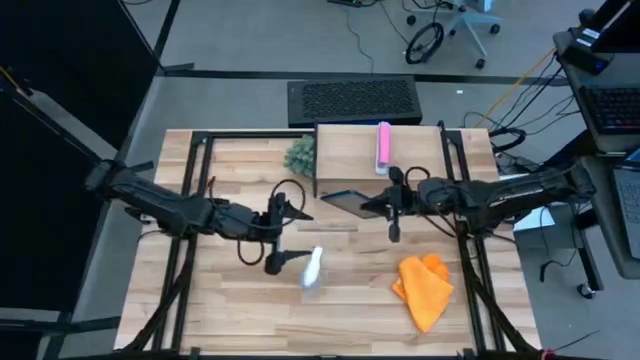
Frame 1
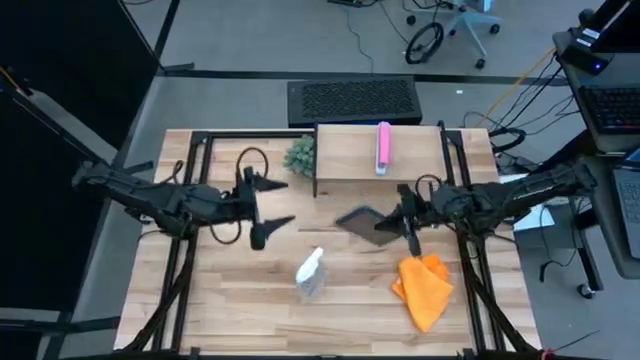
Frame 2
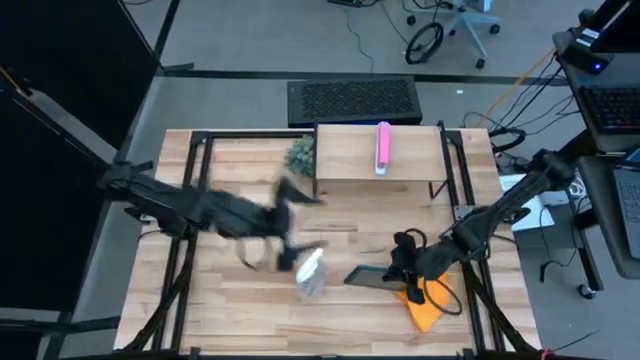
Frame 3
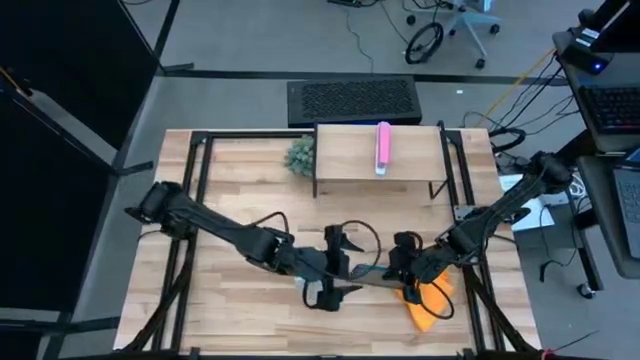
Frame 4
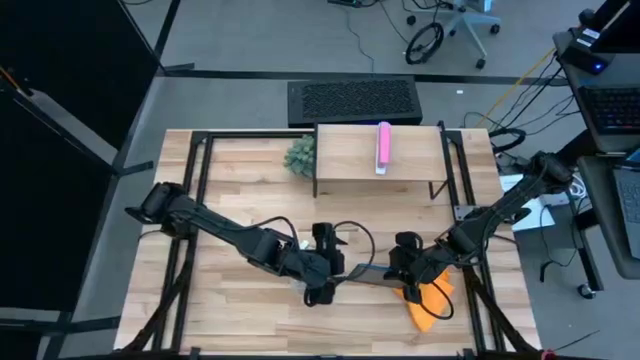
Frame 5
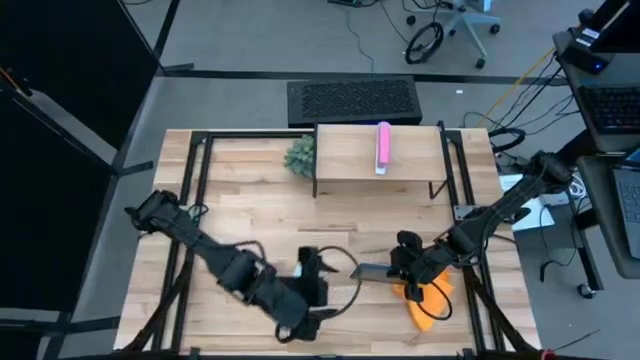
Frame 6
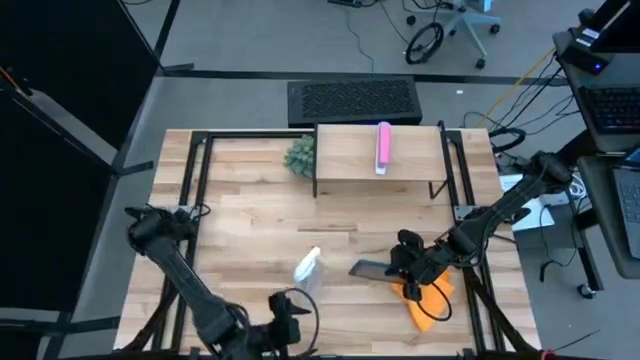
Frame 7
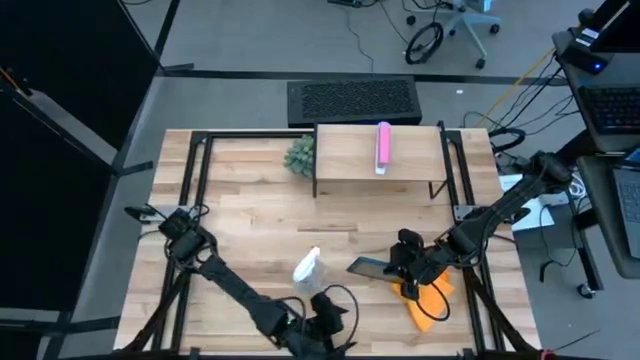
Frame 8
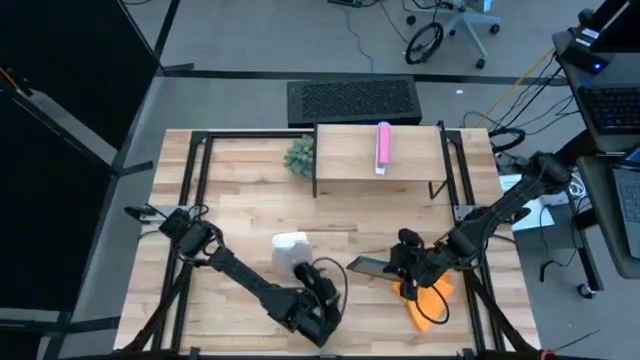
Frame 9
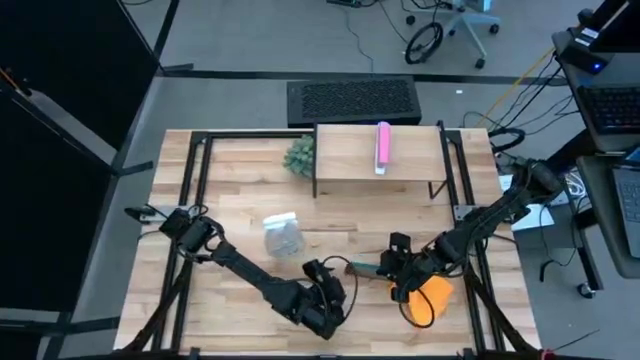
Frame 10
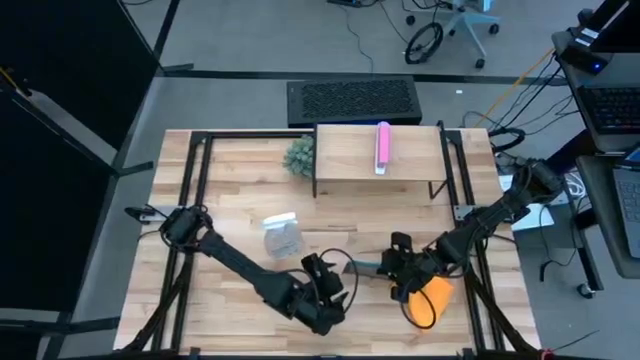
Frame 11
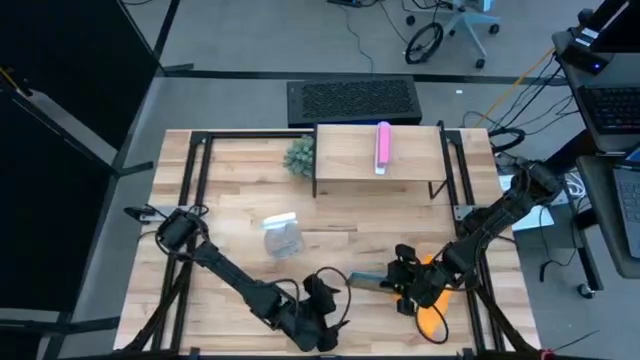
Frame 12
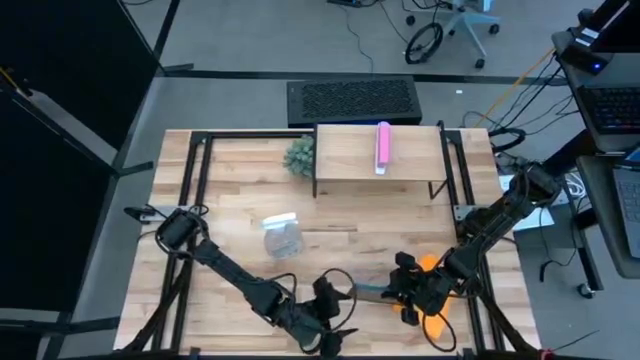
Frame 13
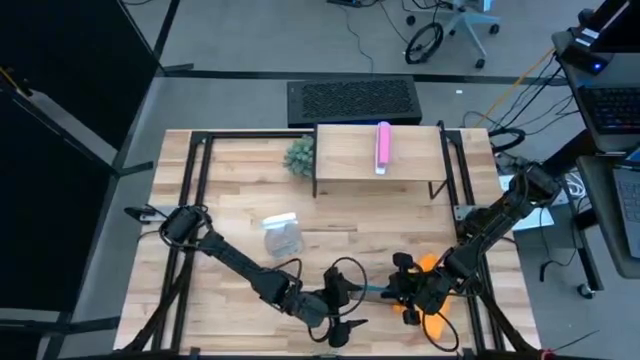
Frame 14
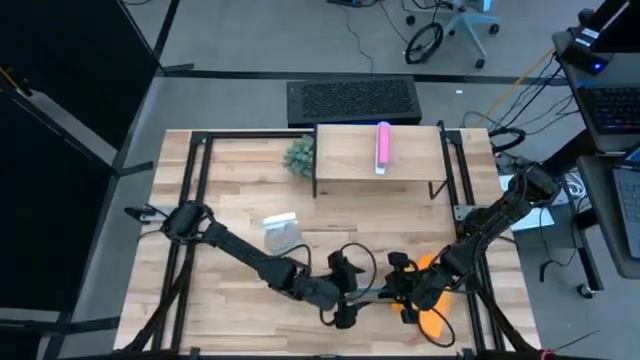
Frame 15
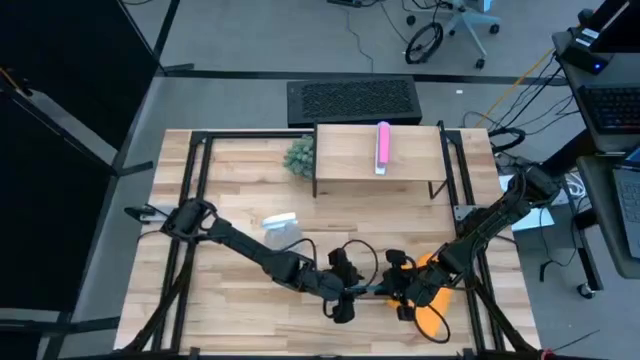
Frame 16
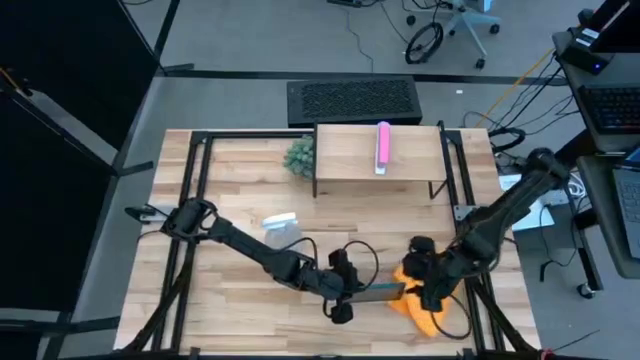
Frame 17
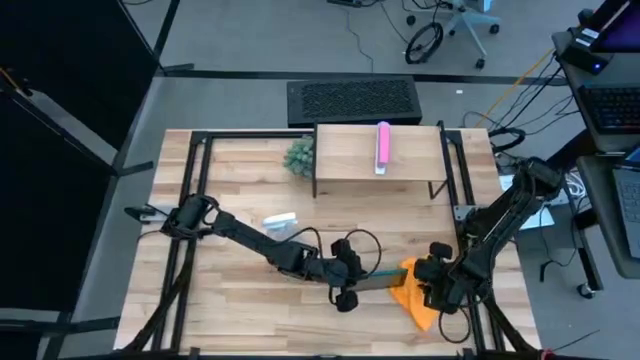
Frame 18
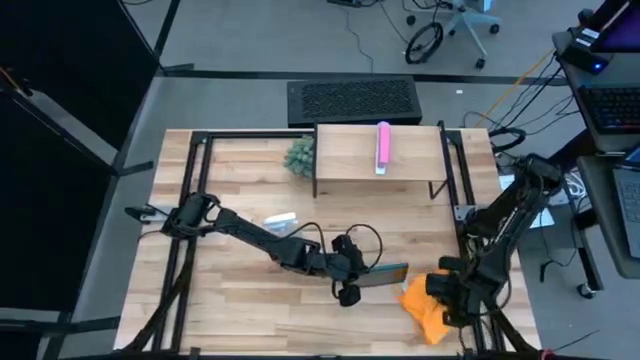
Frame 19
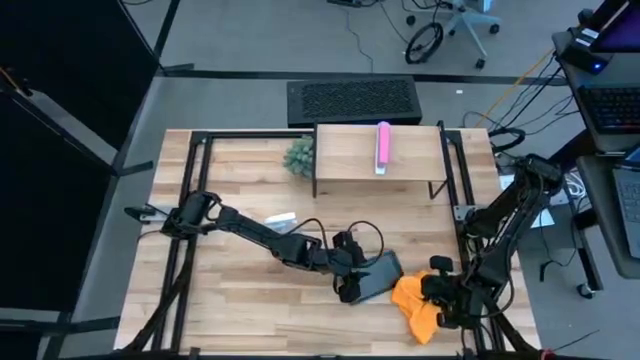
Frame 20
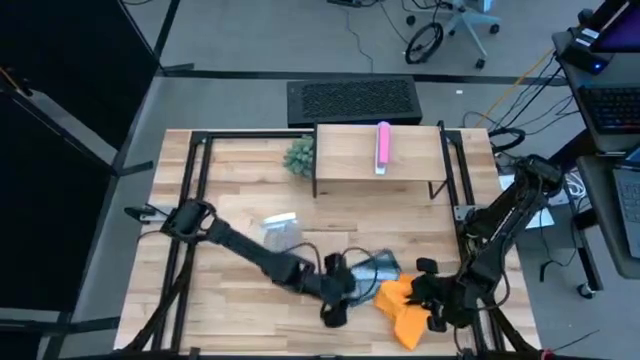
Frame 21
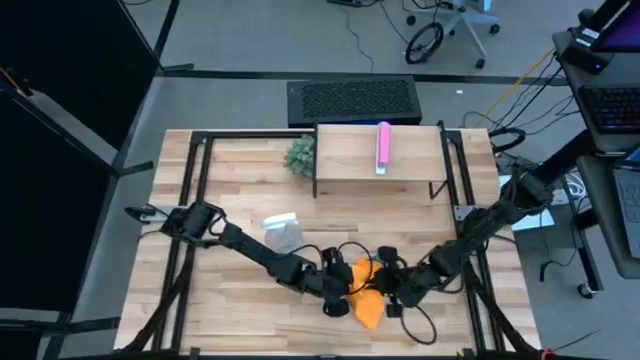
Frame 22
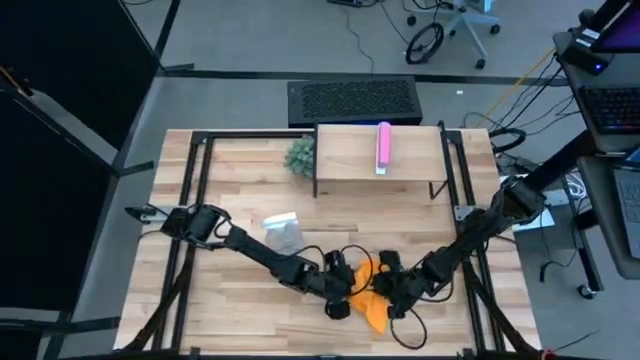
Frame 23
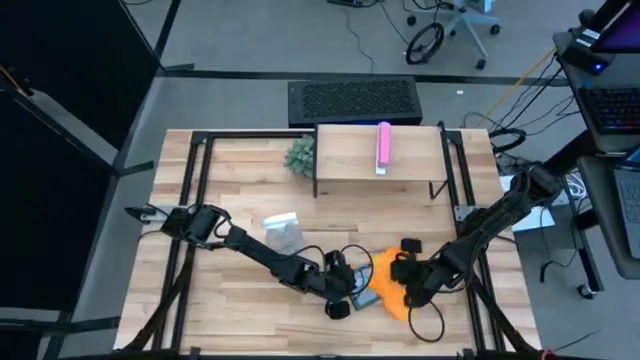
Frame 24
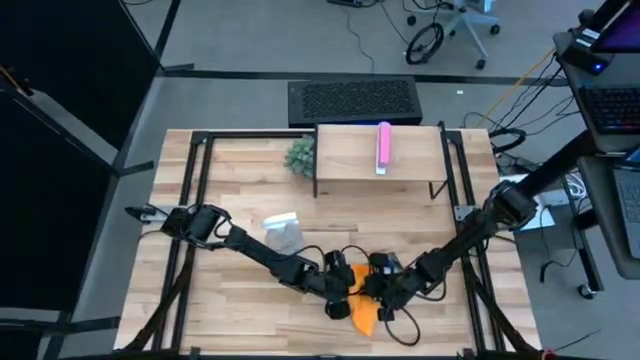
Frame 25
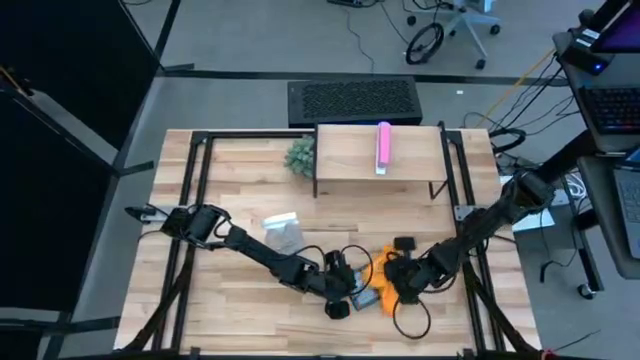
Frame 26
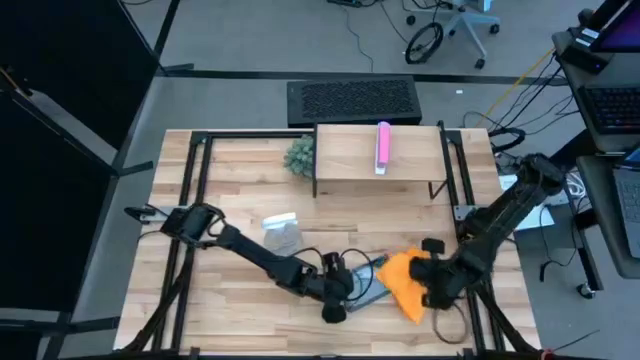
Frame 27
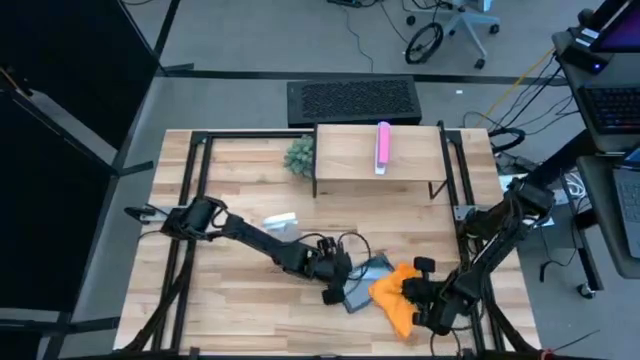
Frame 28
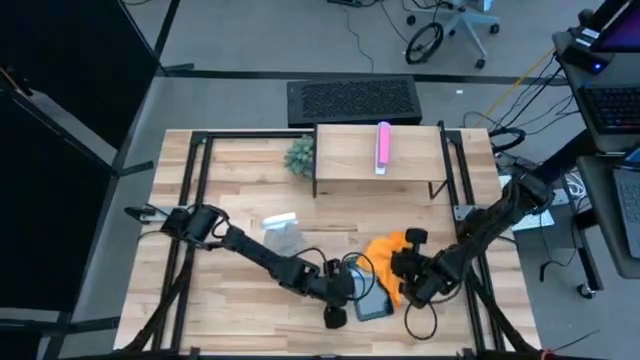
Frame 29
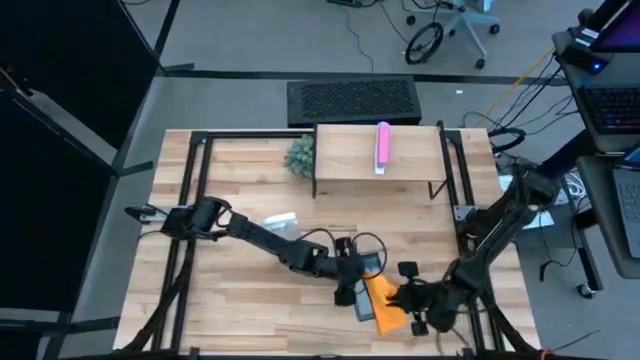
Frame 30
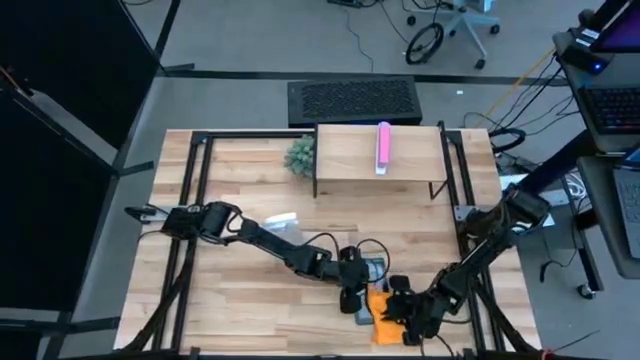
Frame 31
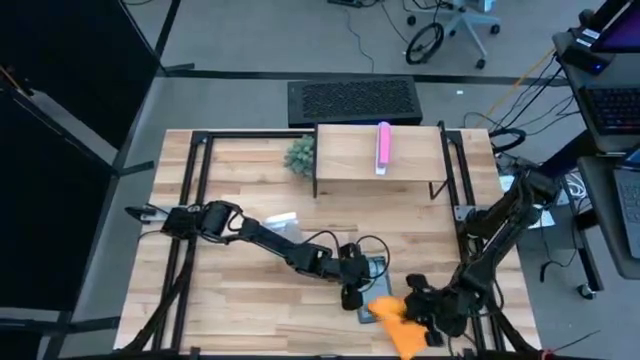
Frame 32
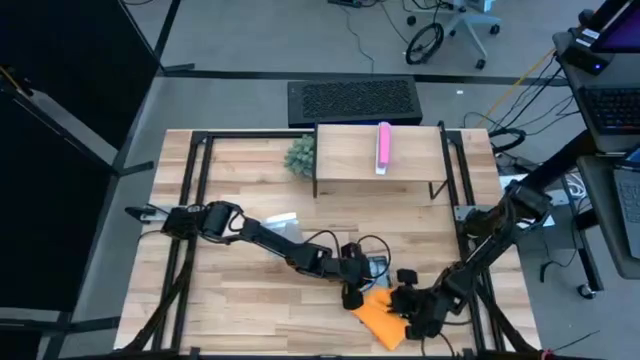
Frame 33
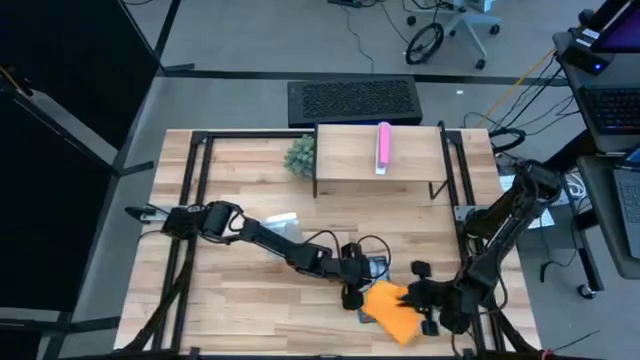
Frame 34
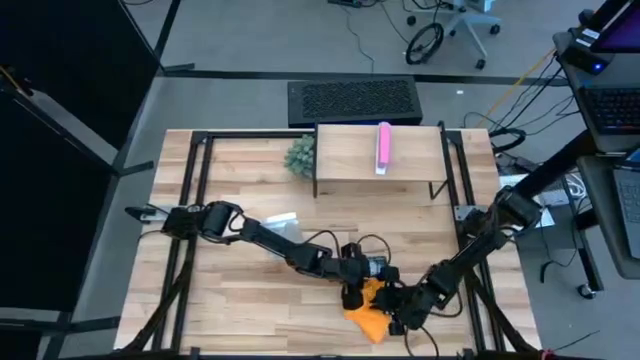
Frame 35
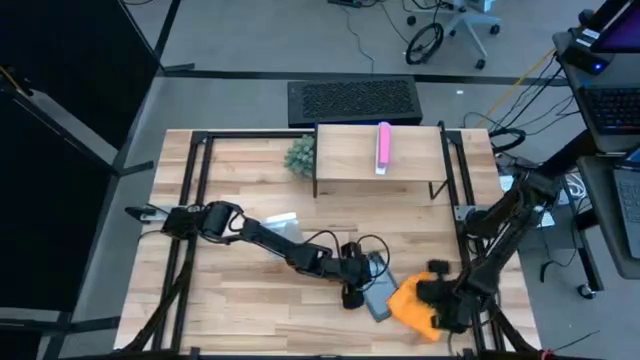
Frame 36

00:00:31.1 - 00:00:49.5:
Task: Apply microfiber cloth
Wipe the tablet with the microfiber cloth

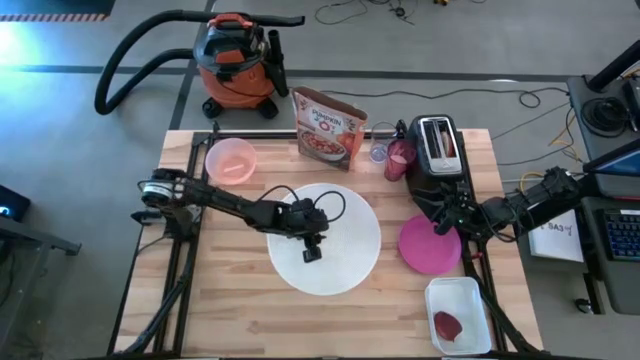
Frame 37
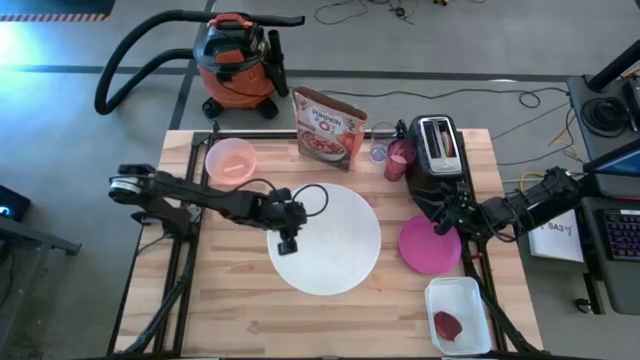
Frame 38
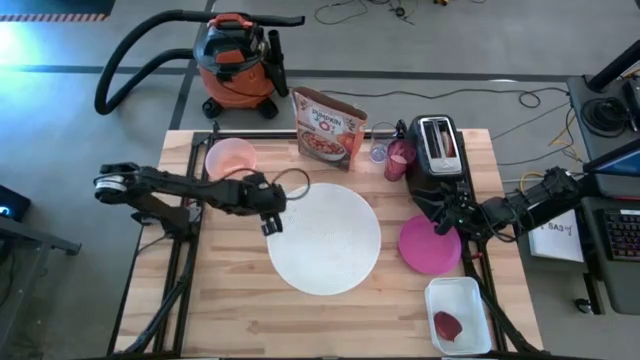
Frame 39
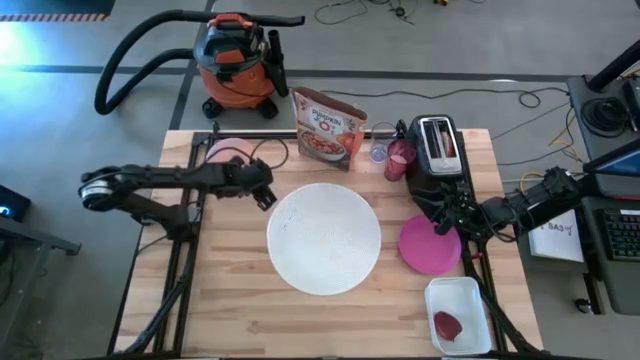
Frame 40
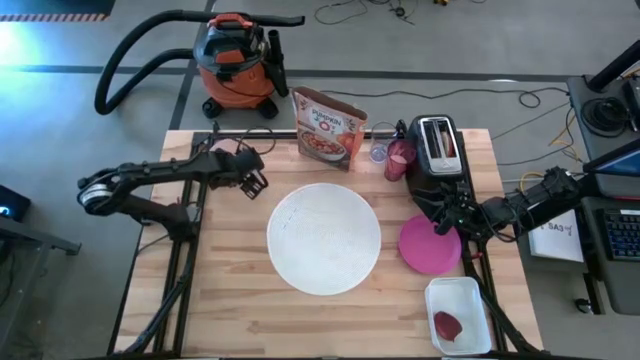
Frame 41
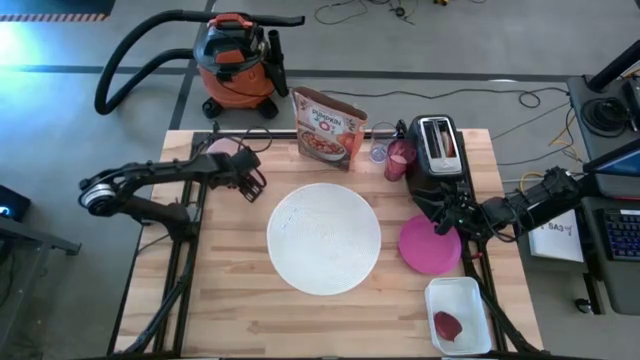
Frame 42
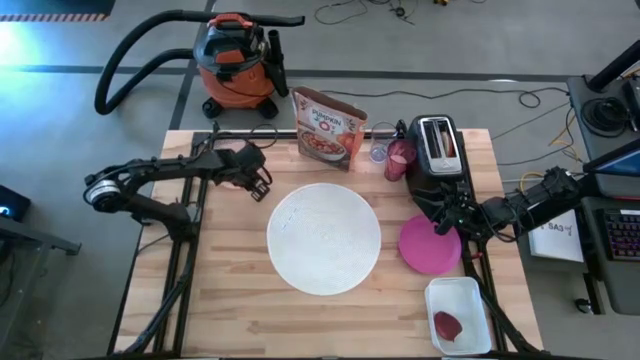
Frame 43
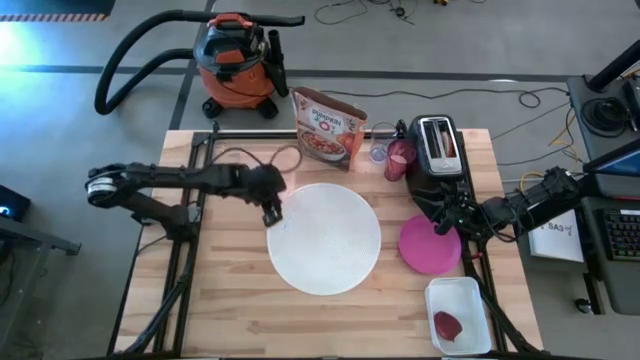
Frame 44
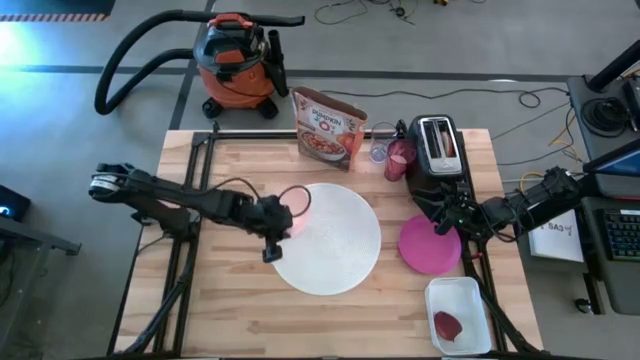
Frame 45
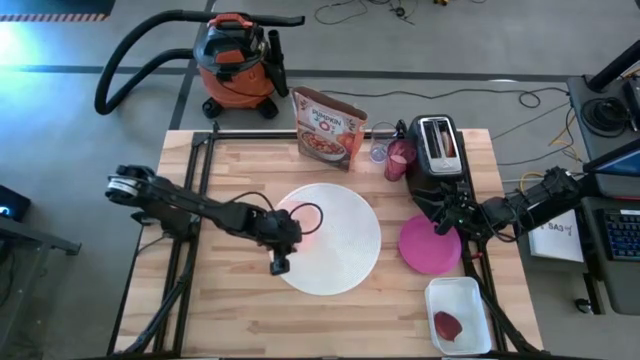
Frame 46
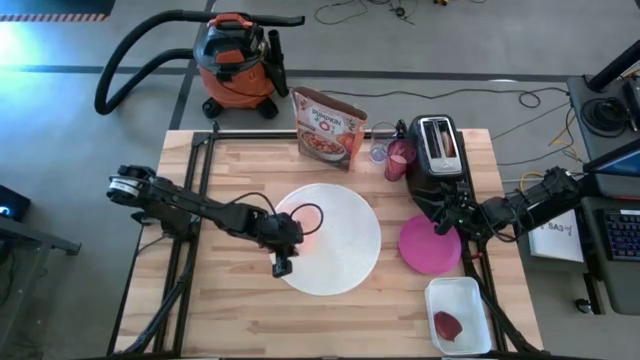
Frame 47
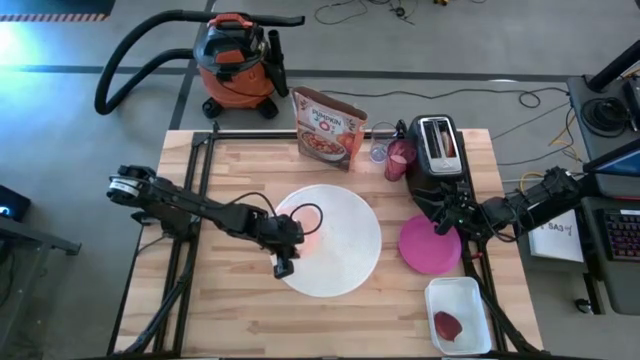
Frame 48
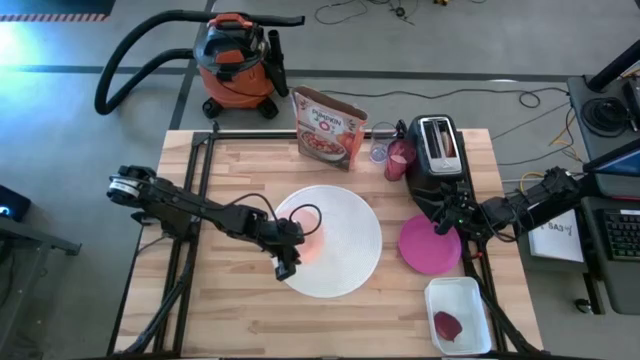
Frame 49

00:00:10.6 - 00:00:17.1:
Task: Arrange a breakfast setting
Put the orange bowl on the white table mat
